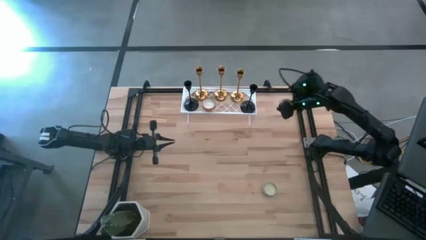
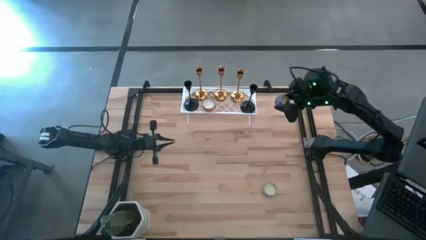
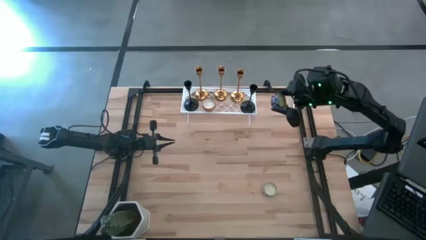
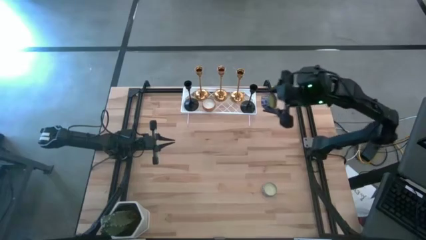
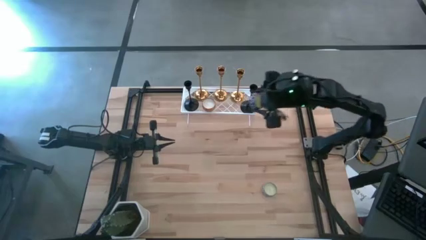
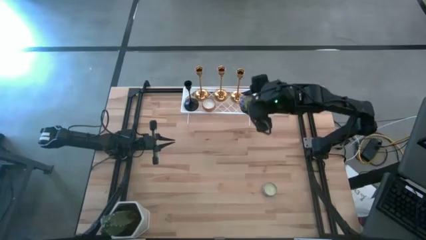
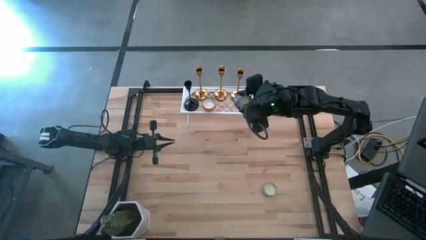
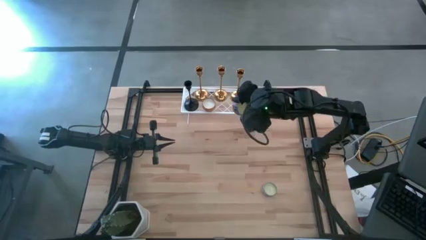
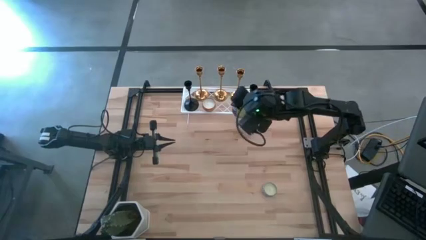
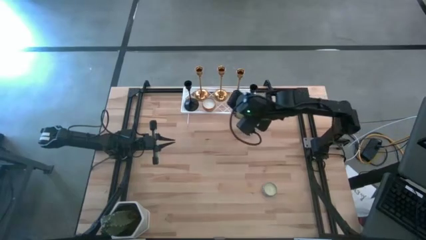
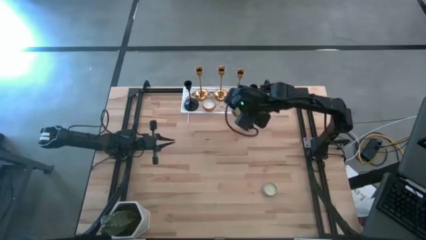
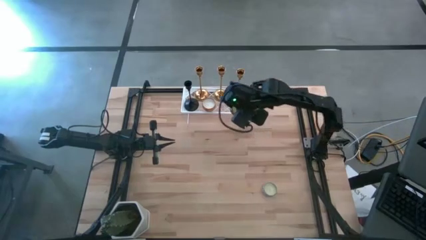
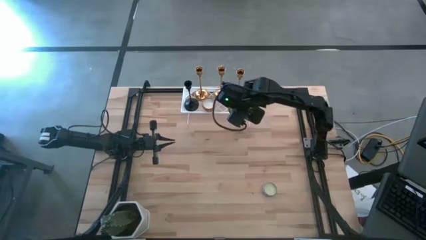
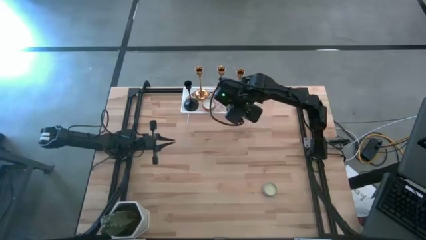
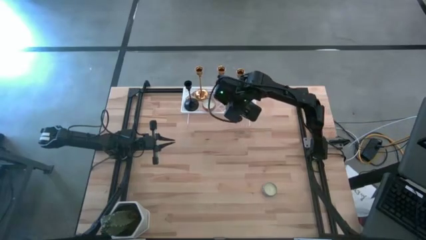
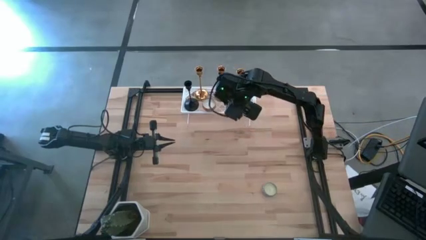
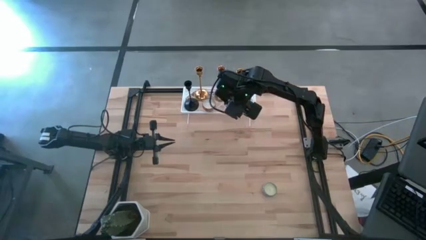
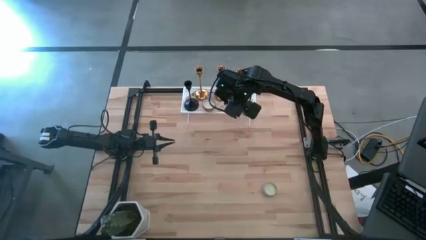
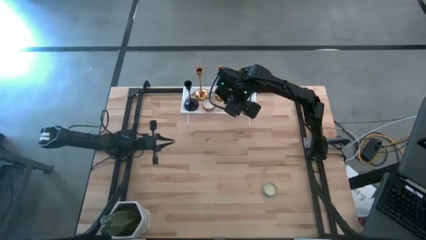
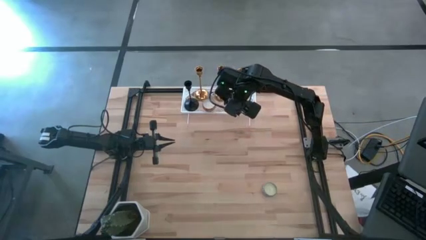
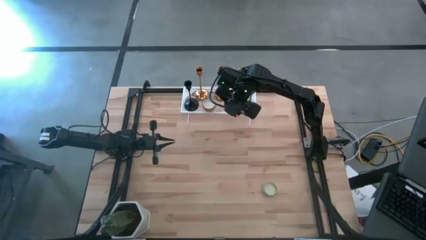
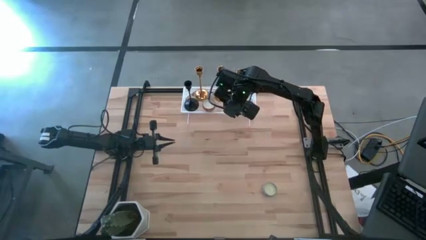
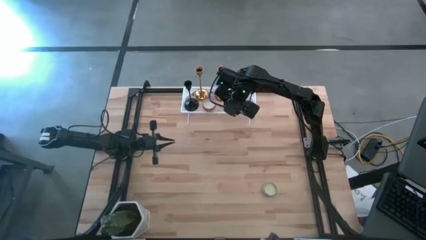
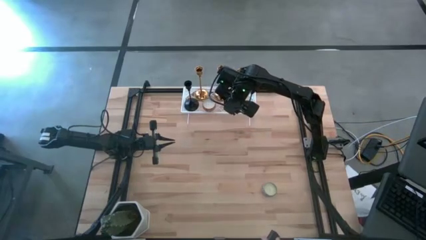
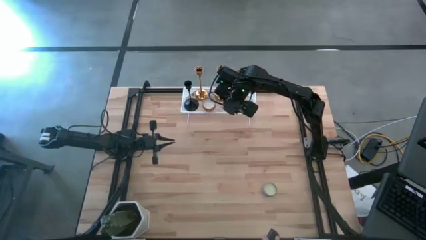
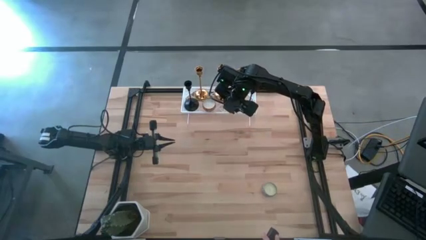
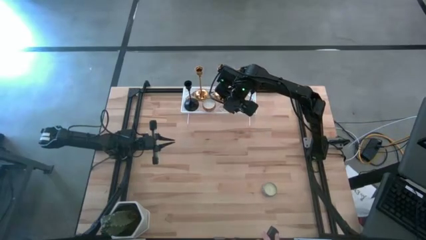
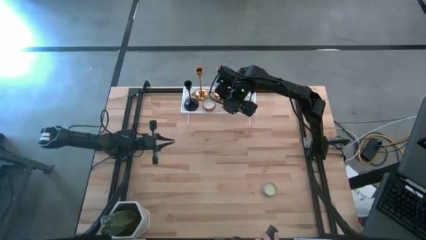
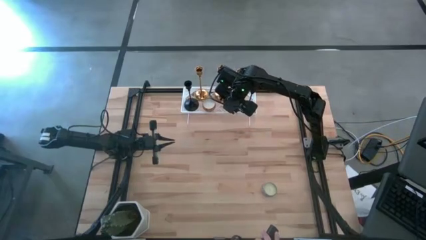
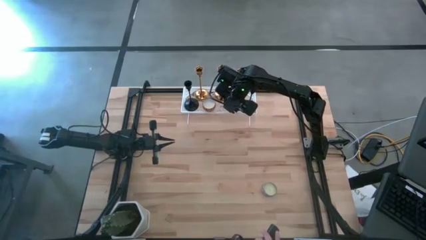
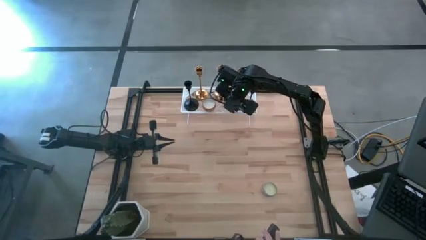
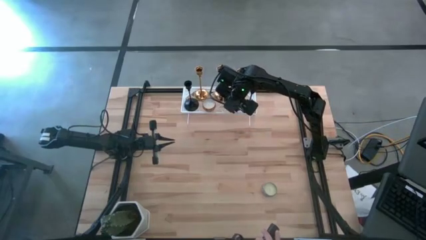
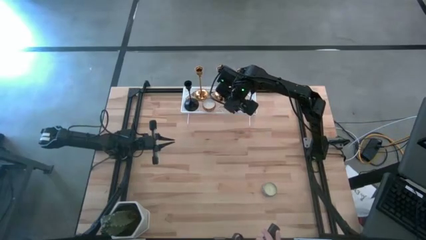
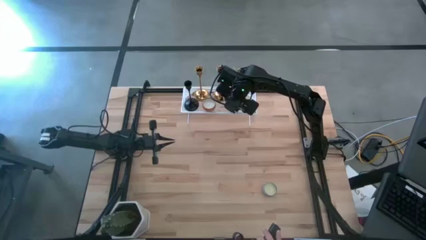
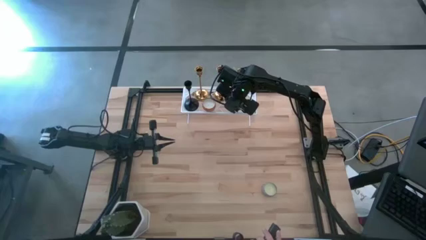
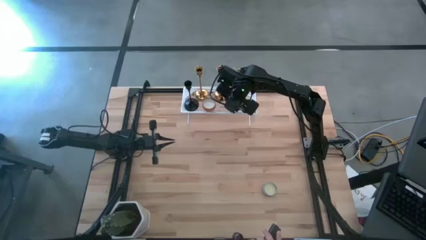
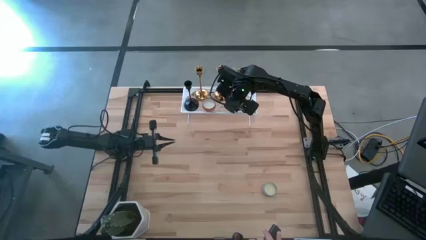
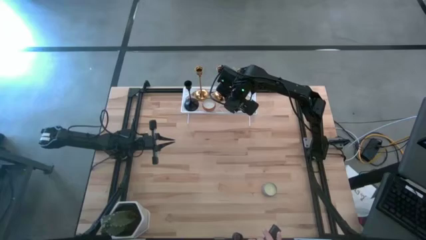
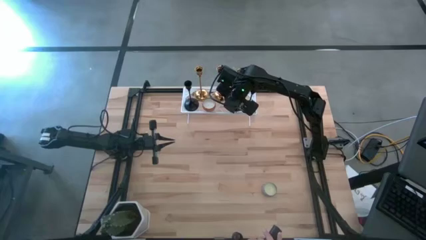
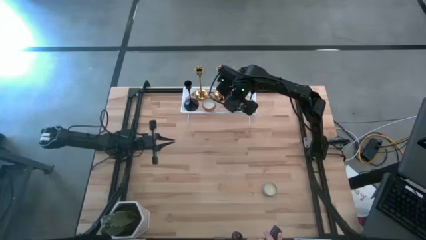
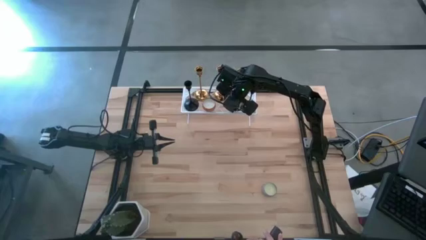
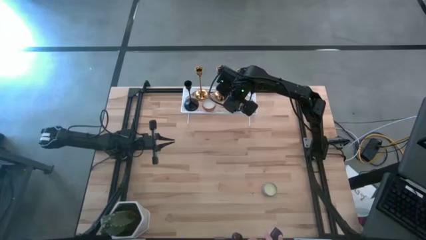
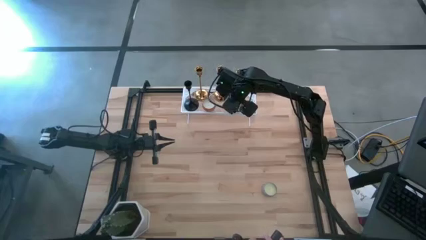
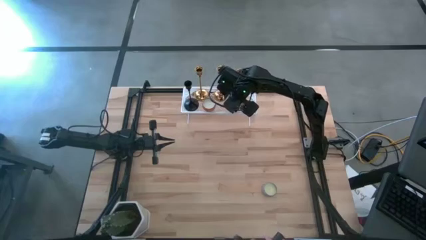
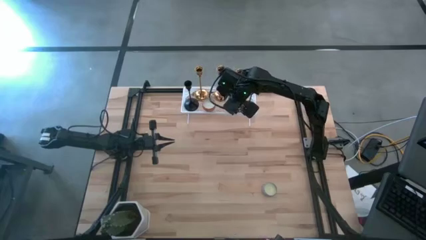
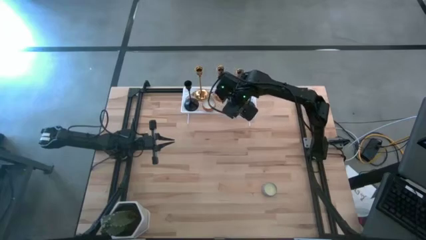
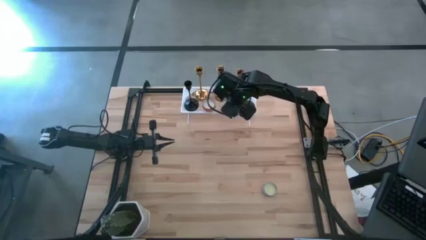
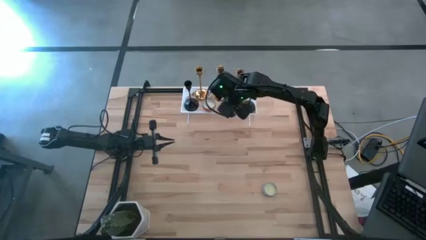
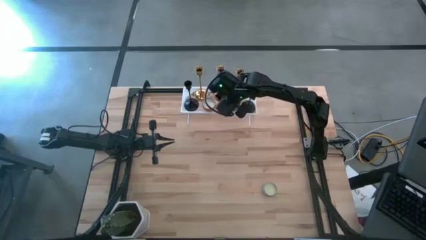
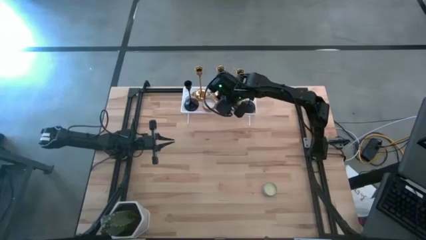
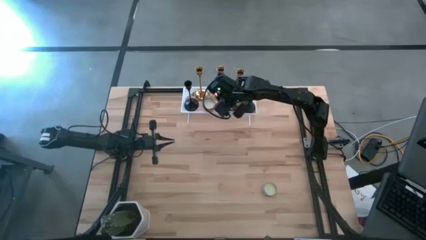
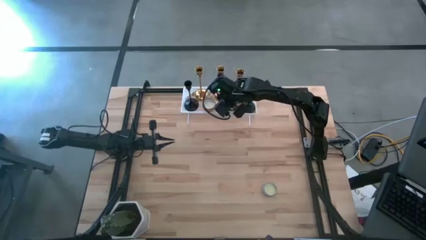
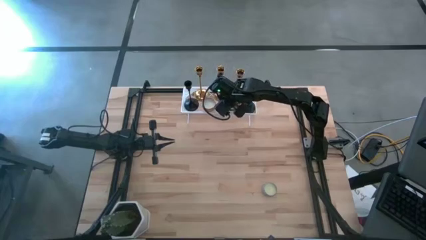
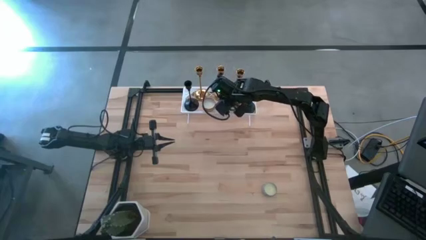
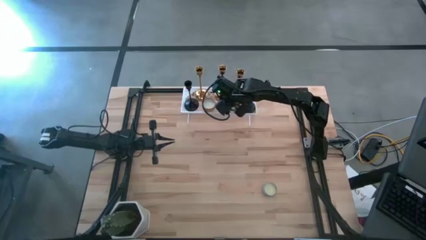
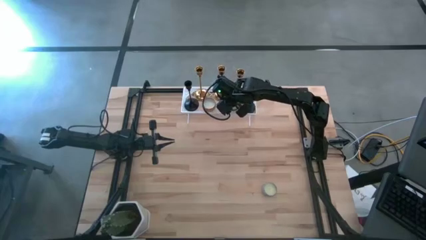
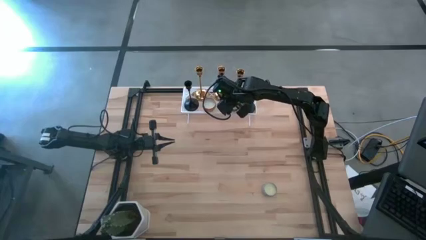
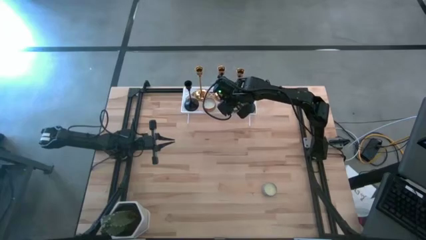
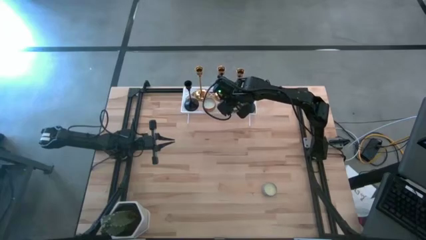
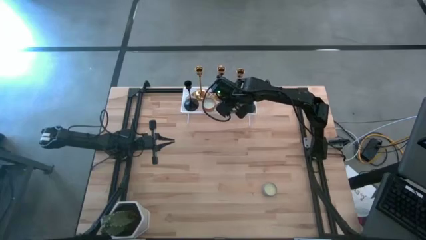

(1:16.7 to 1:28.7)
Task: Pick & Place candle stick holders
Put the yellow scented candle on the shelf

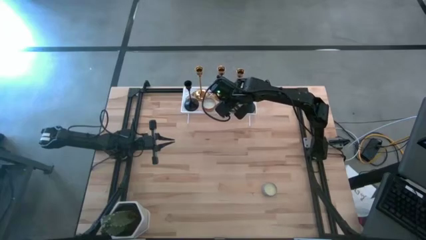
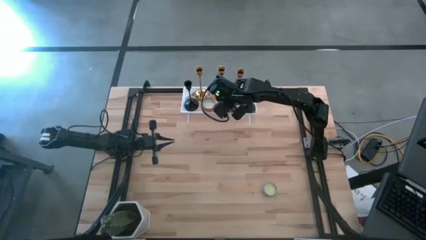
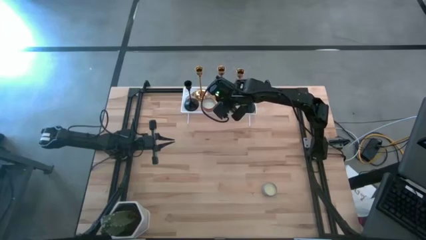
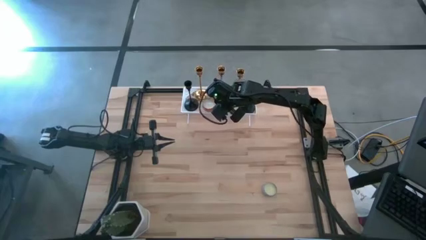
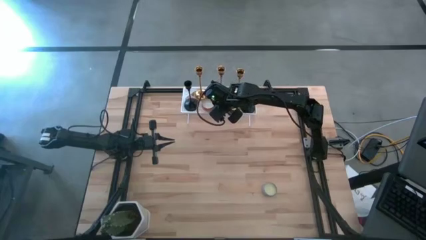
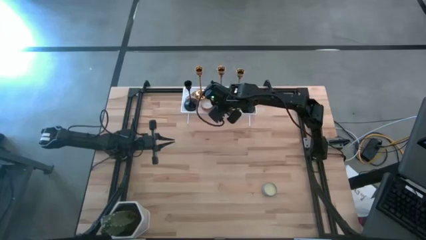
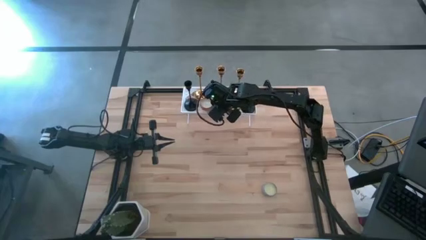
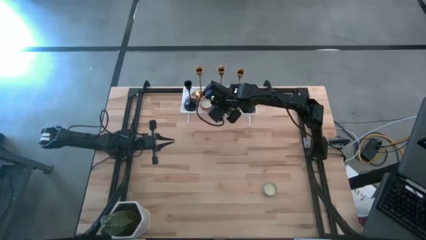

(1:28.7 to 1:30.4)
Adjust the white scented candle on the shelf

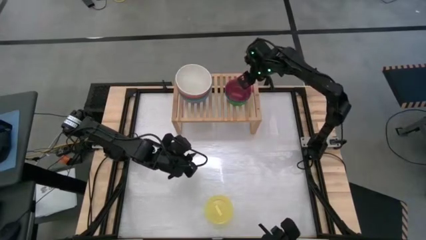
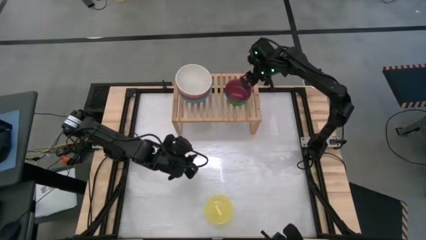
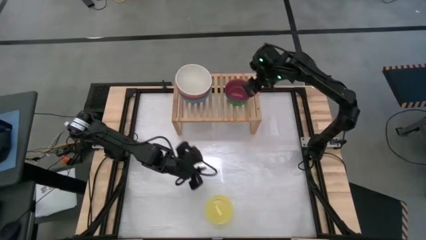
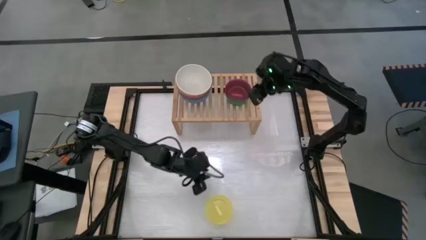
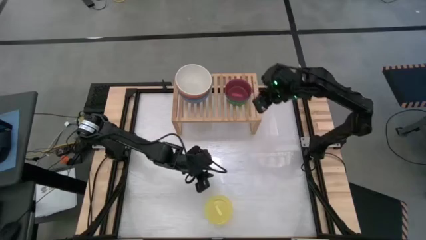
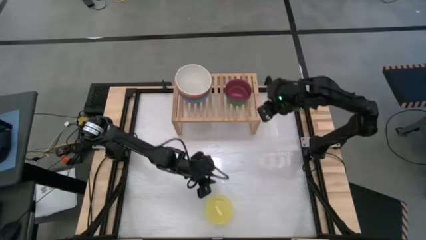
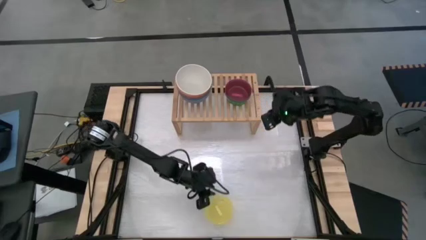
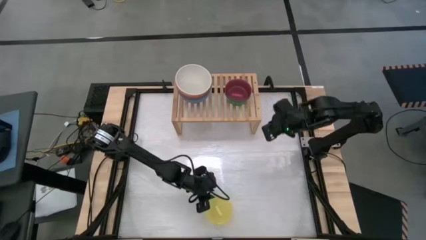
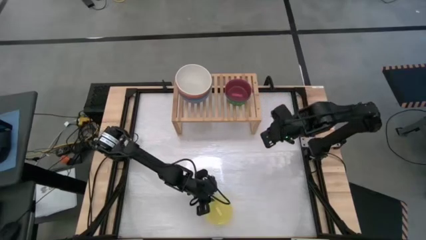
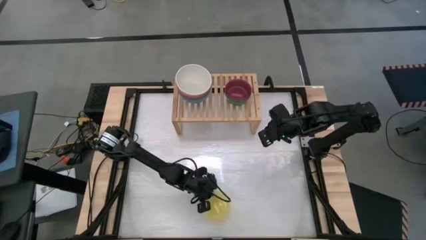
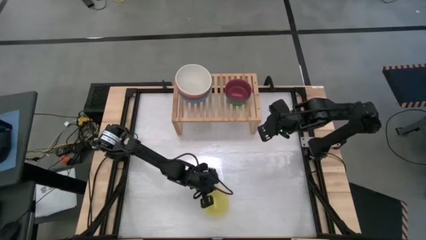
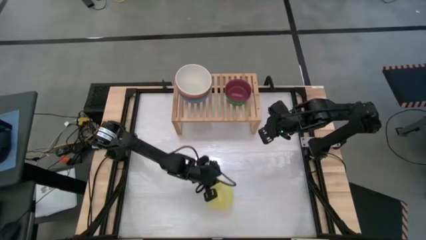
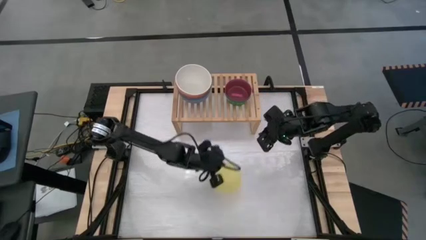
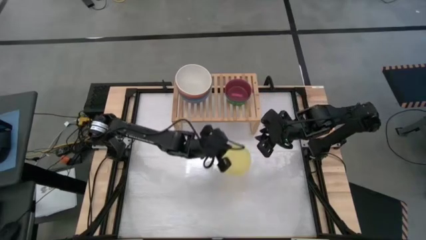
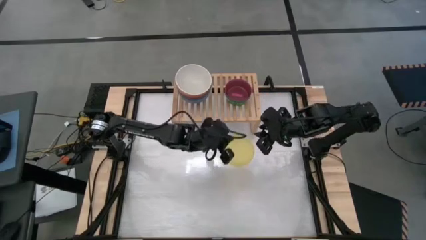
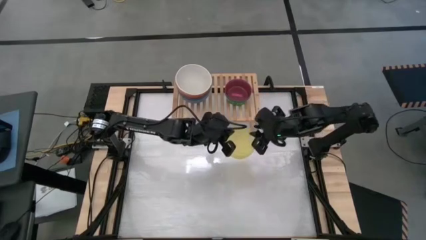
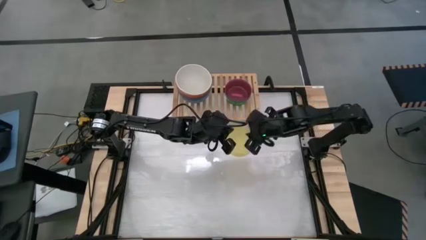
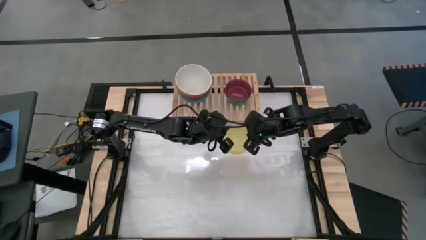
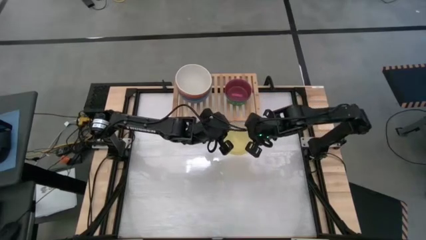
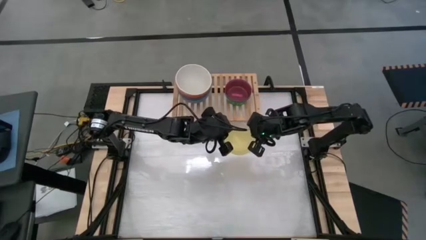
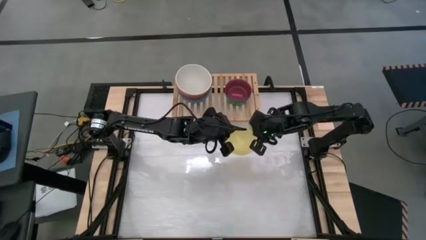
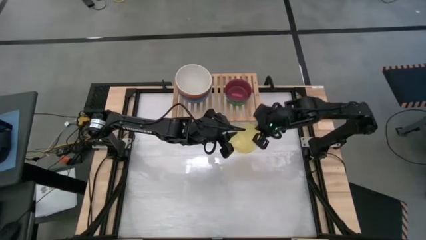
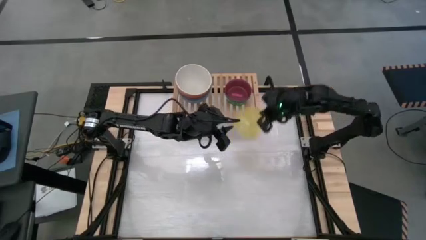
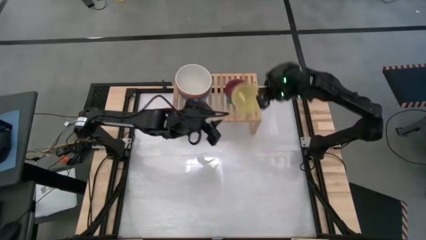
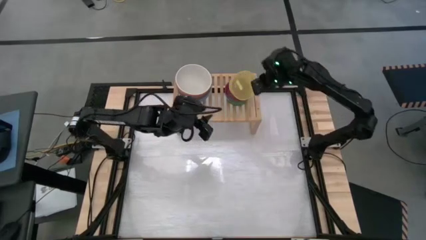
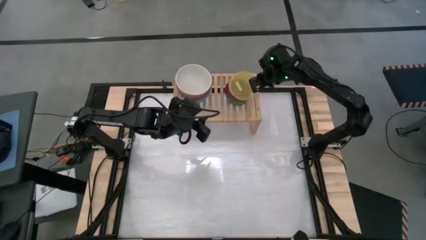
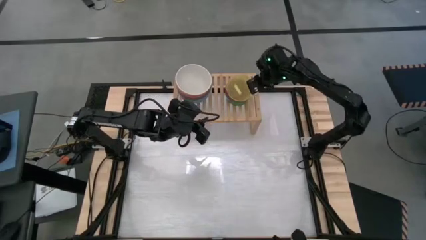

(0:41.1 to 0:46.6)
Task: Place and stack bowls onto a shelf
Stack the yellow bowl on the red bowl on the shelf
